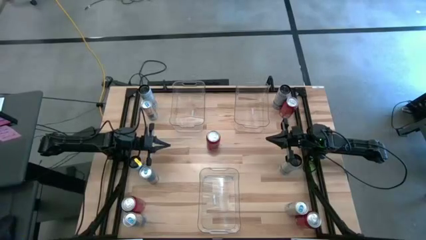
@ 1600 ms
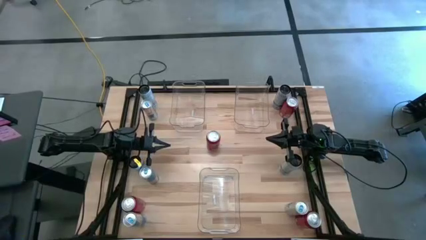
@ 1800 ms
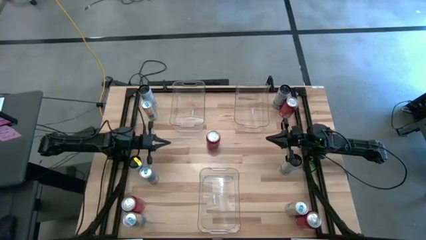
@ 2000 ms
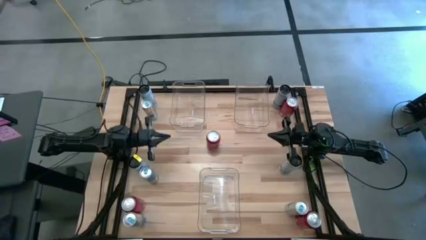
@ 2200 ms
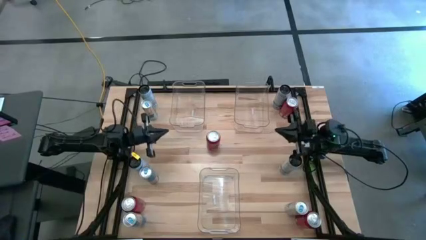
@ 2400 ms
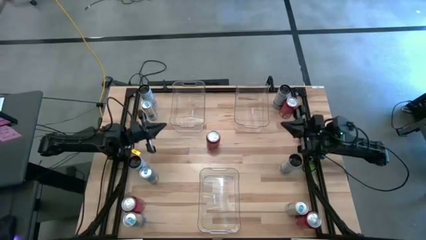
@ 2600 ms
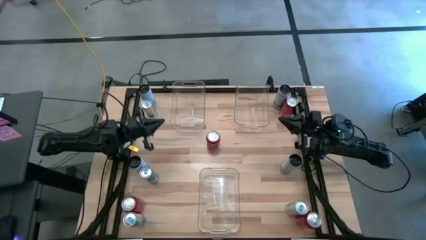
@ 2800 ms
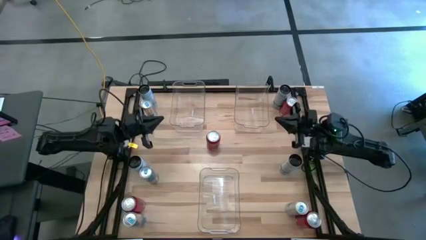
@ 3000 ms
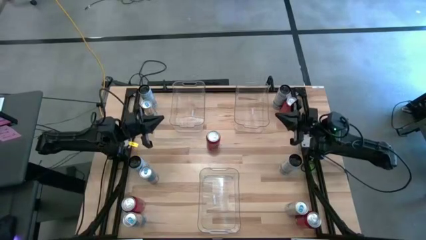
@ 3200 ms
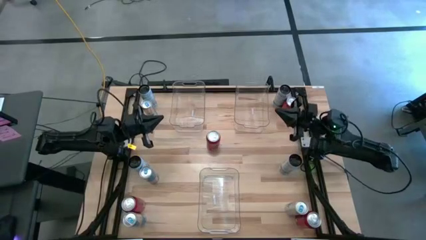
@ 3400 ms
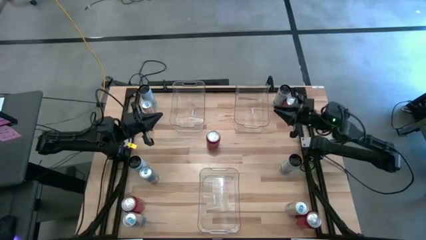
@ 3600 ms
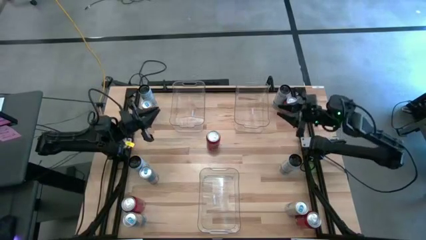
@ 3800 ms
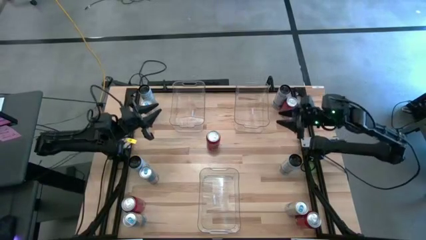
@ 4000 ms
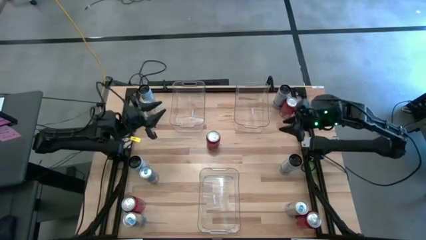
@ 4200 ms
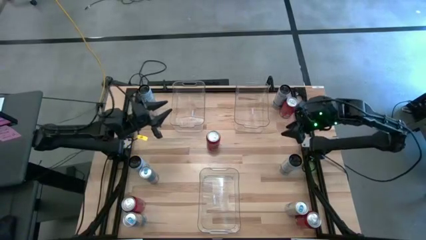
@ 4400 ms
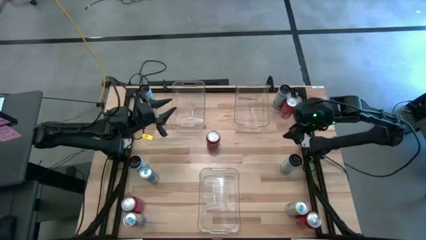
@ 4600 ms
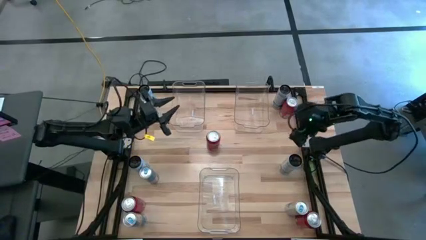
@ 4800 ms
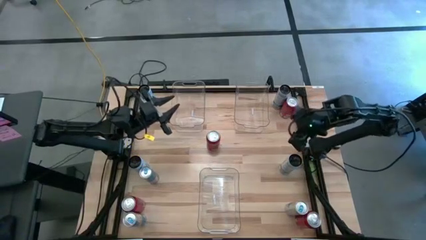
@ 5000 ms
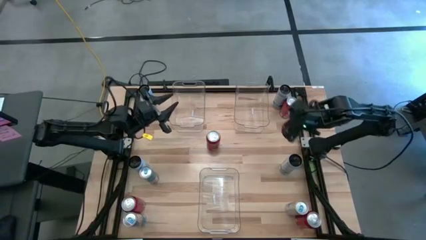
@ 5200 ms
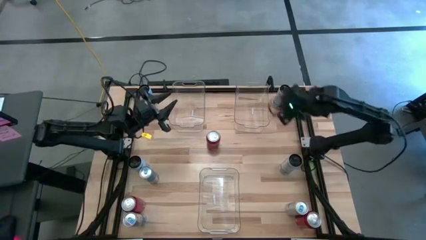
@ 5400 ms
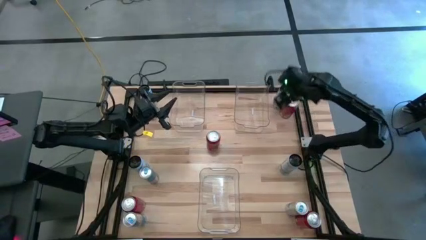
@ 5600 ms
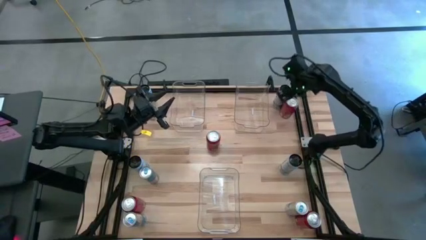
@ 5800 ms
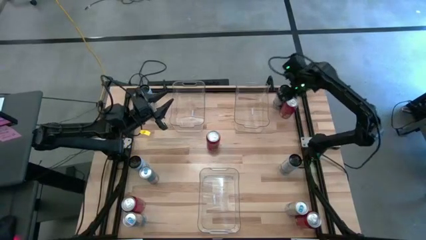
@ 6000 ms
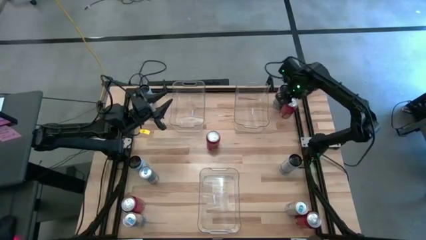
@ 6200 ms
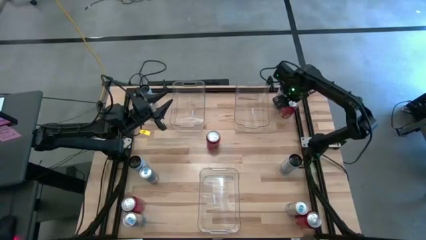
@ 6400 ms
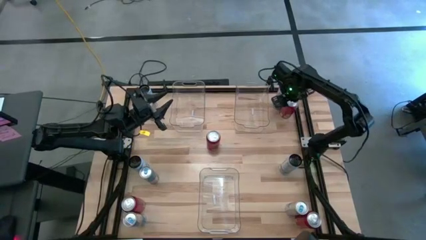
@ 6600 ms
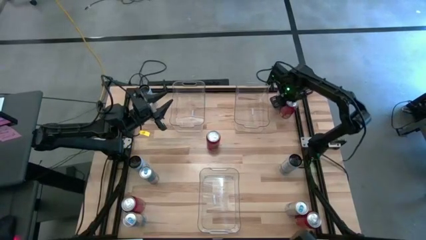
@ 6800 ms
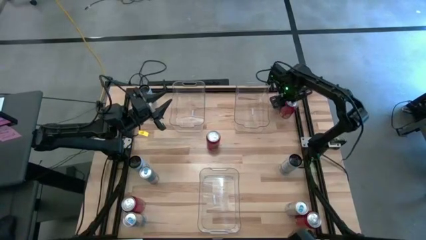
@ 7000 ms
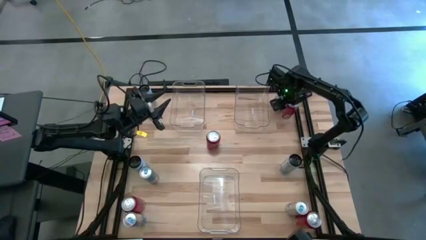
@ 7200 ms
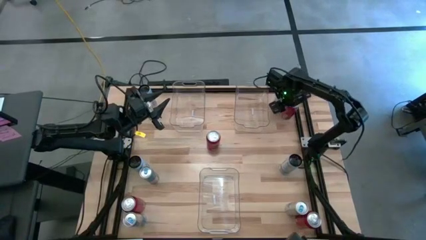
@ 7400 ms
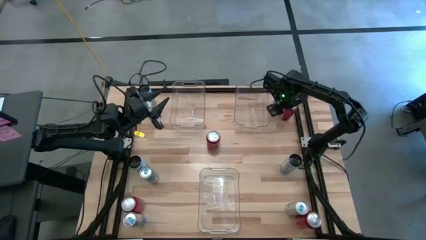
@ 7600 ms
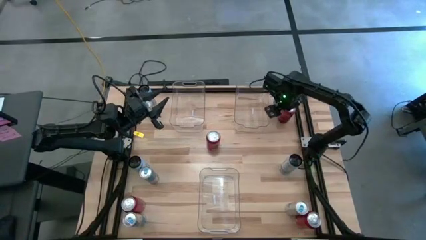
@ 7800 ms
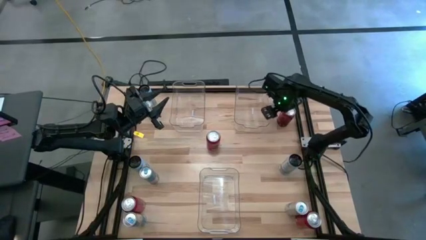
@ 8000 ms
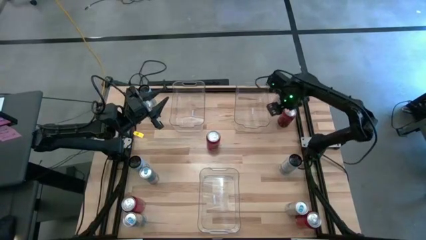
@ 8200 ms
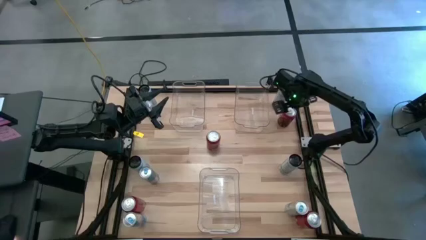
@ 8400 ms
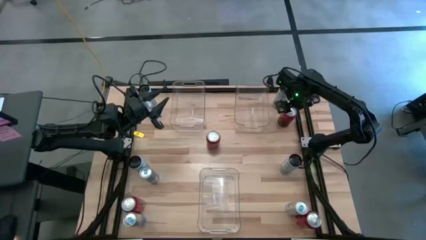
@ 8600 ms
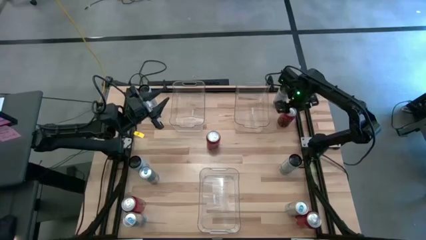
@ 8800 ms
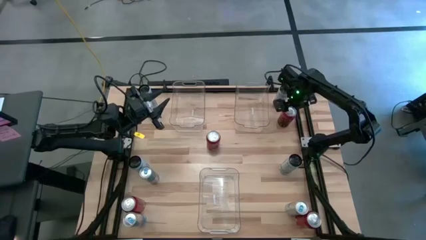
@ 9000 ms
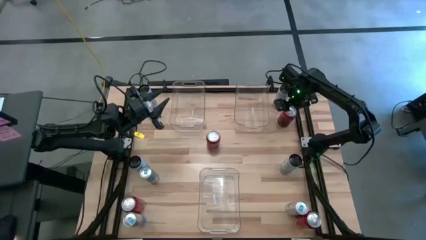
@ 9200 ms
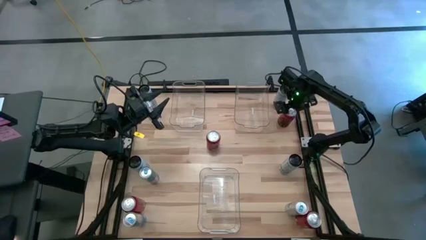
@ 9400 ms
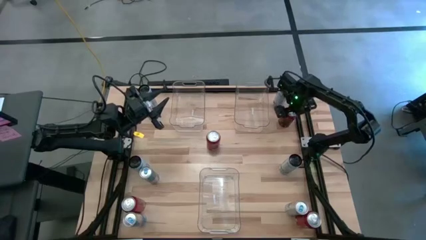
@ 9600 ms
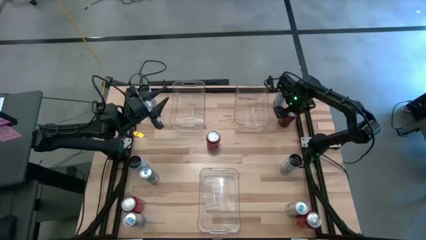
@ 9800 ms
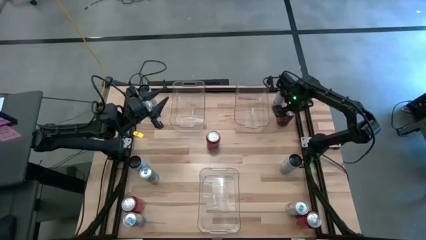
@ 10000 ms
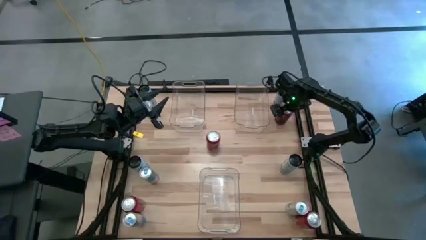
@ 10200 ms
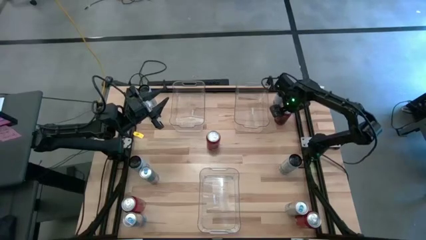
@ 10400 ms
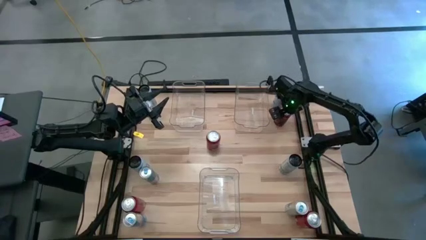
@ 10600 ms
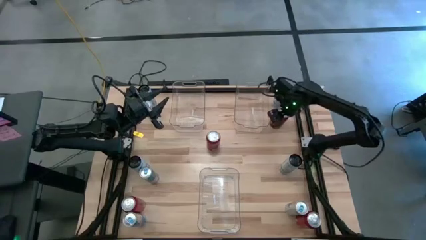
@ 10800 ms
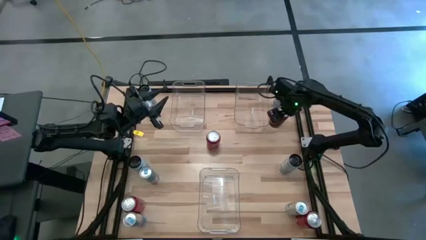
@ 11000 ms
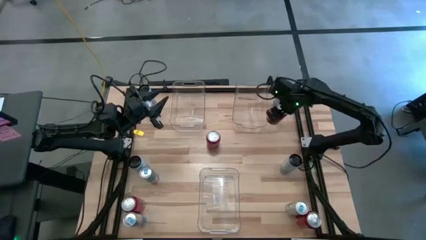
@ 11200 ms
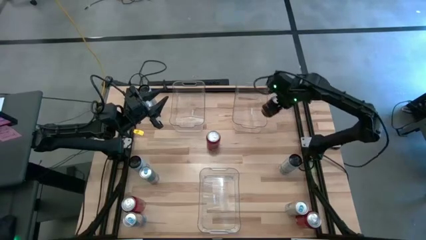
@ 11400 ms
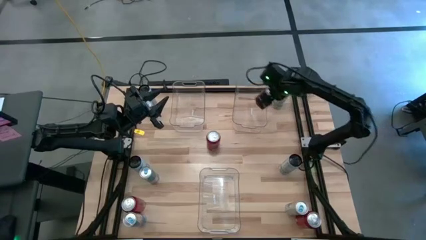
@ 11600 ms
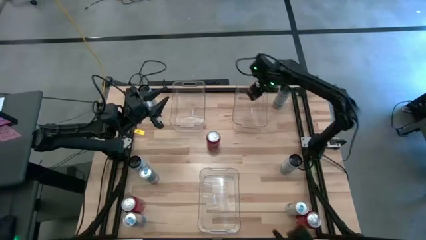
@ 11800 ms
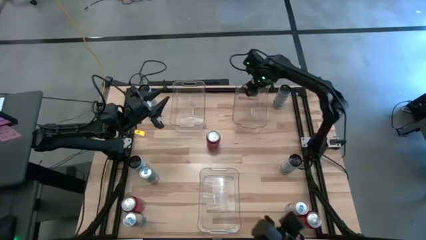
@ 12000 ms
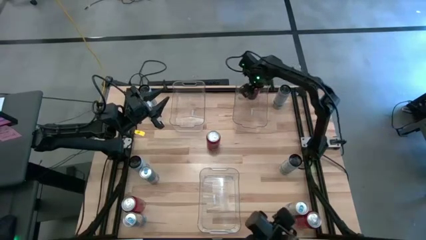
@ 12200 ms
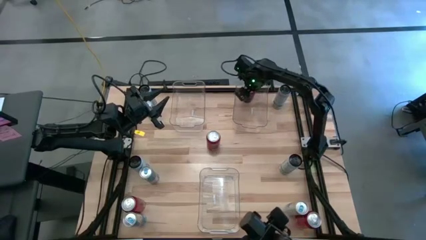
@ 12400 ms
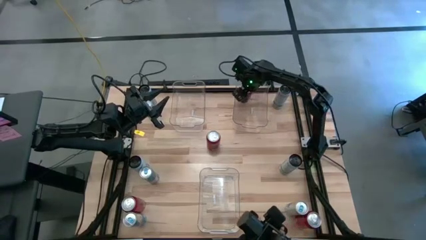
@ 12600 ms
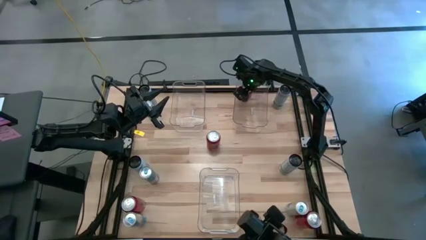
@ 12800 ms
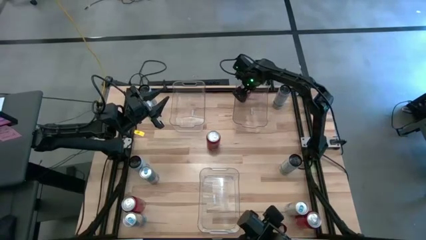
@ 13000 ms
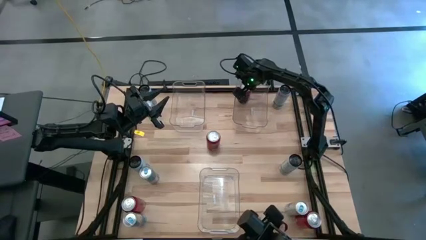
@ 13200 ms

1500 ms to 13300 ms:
Task: Sort soda cans
Put the top right red soda can into the top right transparent bin

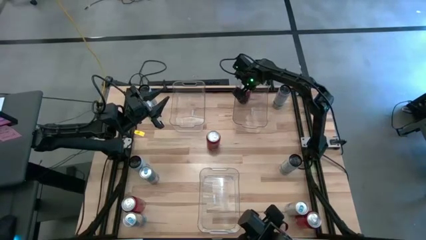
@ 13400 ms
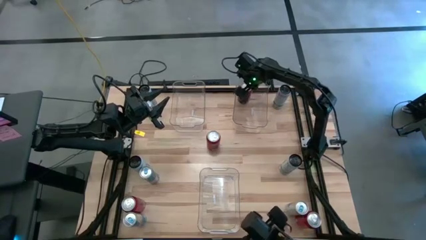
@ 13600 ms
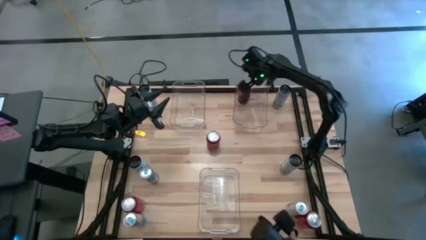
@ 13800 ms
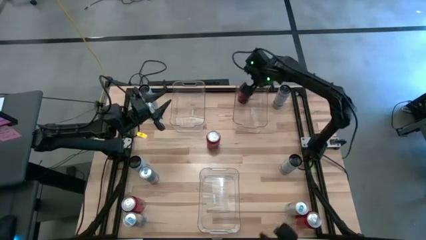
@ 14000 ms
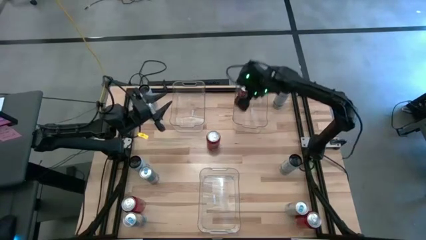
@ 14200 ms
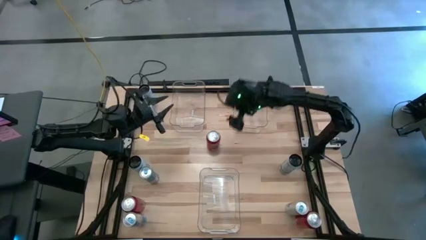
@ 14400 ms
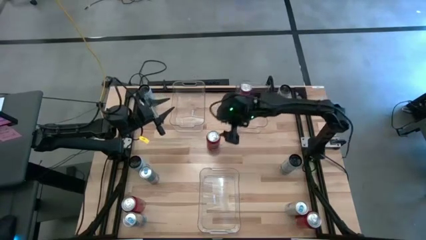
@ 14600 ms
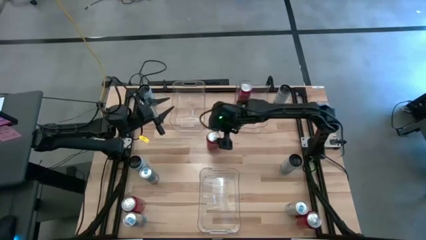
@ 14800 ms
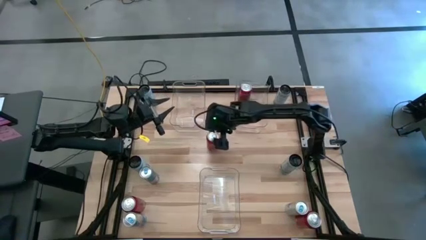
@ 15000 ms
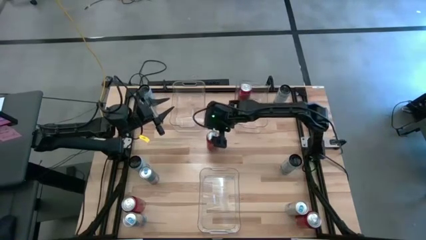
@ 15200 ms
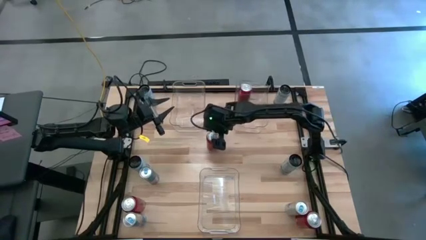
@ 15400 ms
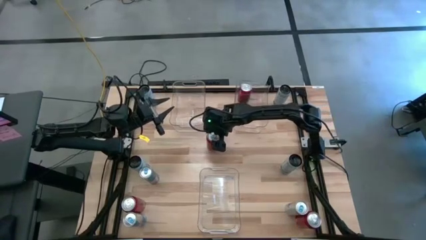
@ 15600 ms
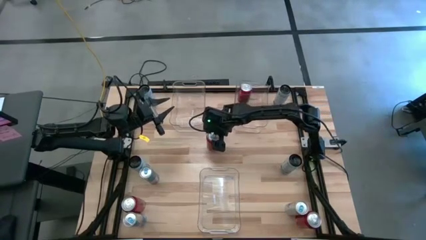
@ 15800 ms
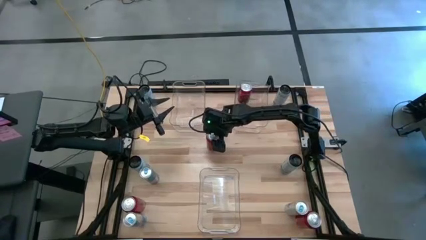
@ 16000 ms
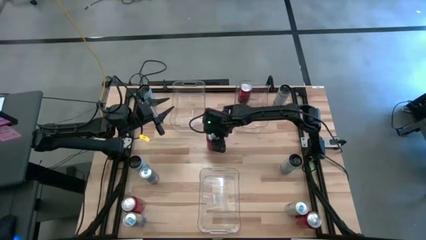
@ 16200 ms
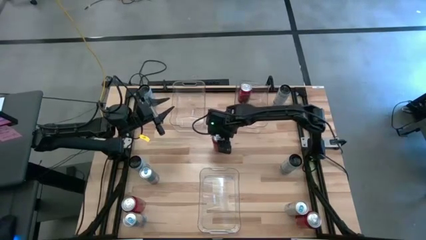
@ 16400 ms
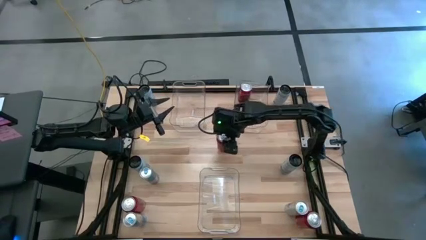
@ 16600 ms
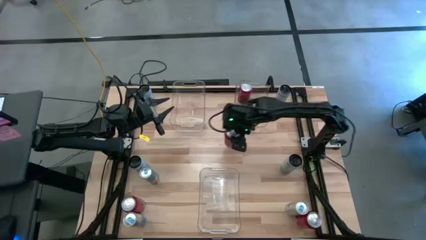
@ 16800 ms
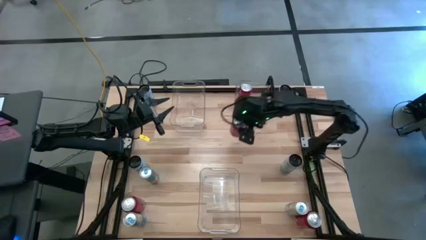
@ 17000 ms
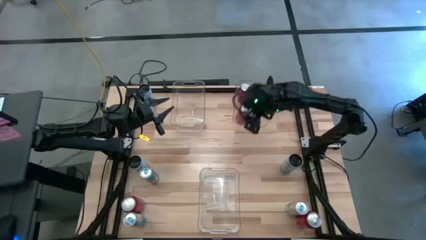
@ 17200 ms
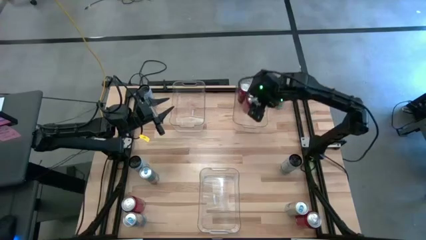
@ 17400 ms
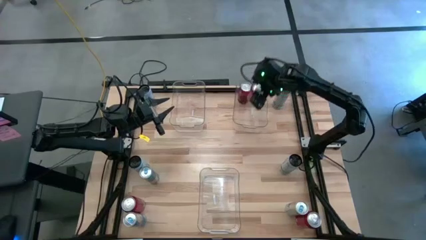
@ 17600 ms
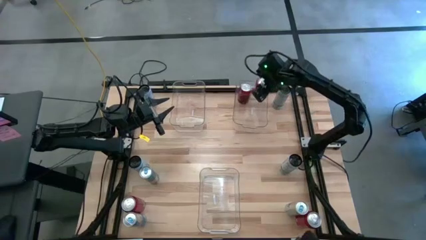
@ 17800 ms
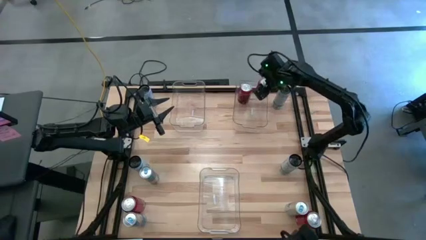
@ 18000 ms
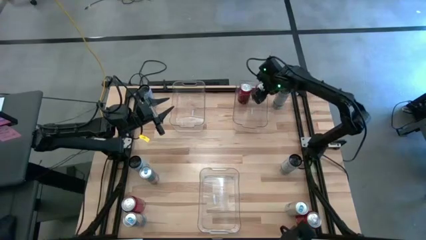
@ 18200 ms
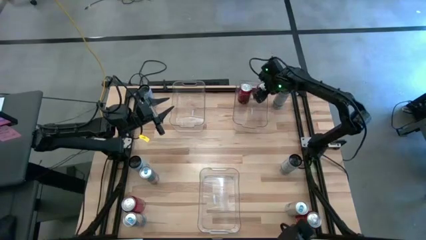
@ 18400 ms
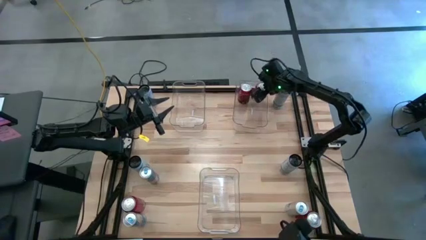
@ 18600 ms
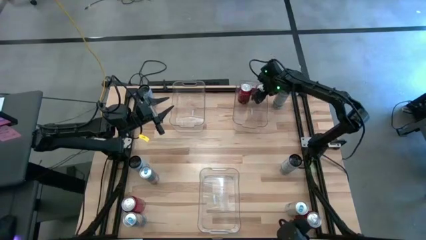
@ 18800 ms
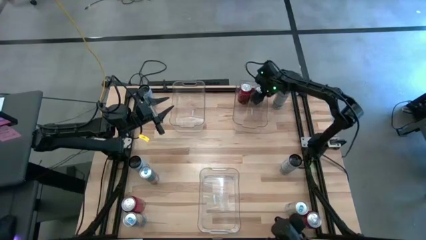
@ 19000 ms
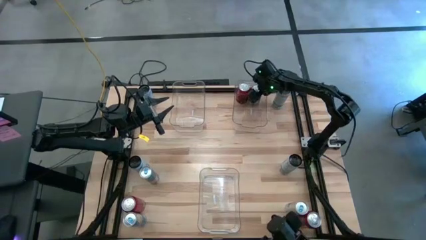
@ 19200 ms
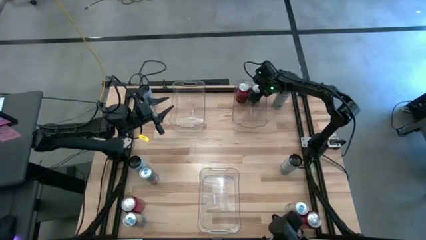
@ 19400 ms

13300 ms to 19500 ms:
Put the top red soda can into the top right transparent bin
